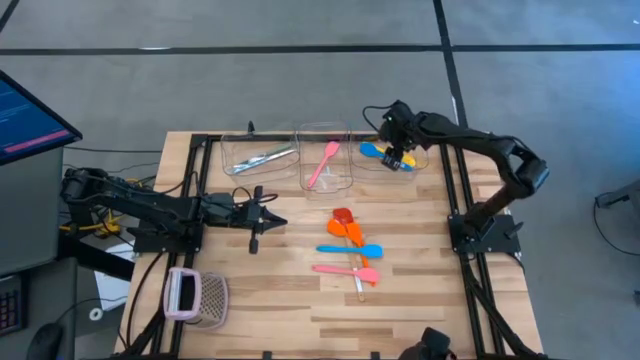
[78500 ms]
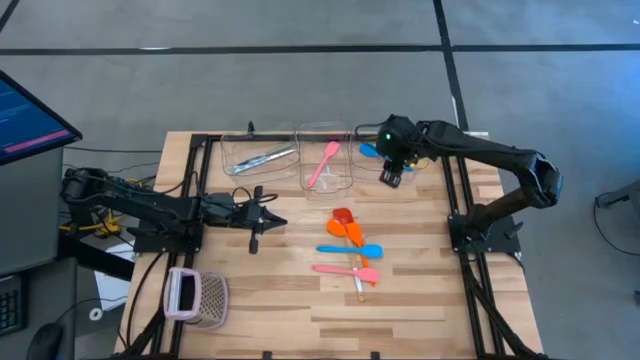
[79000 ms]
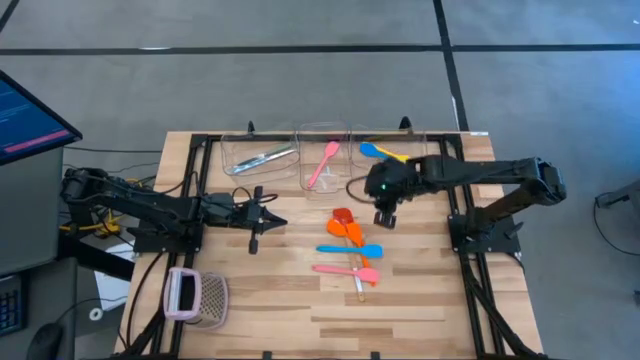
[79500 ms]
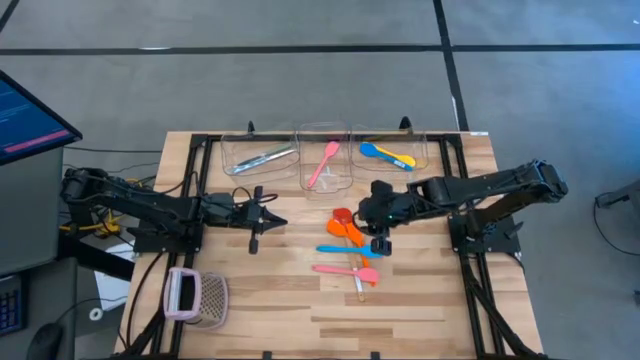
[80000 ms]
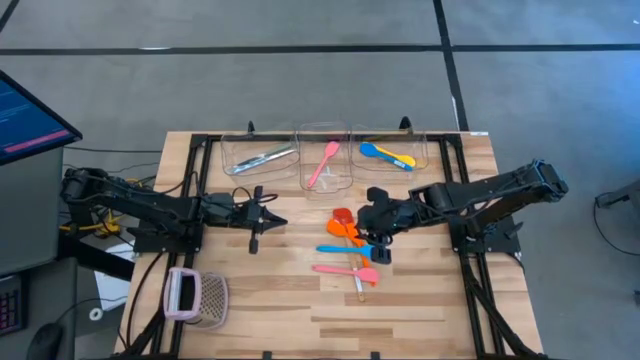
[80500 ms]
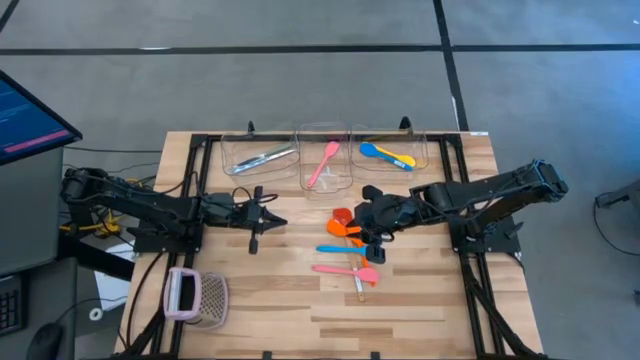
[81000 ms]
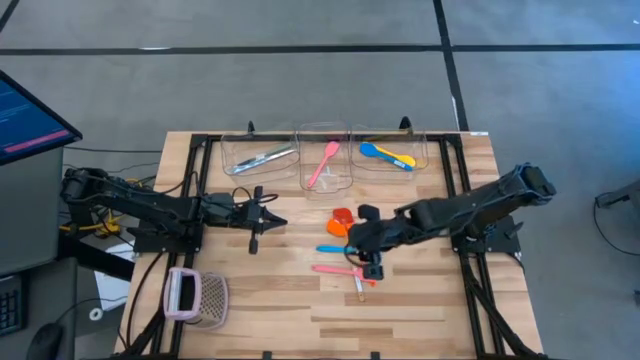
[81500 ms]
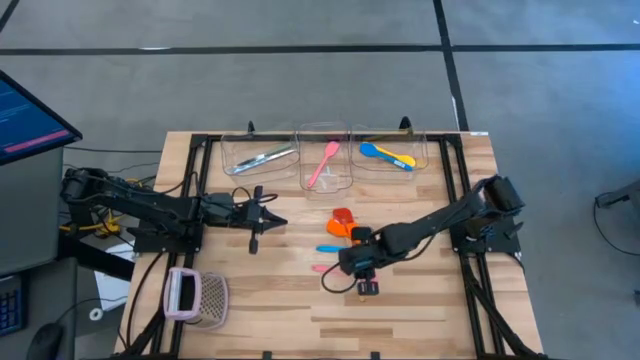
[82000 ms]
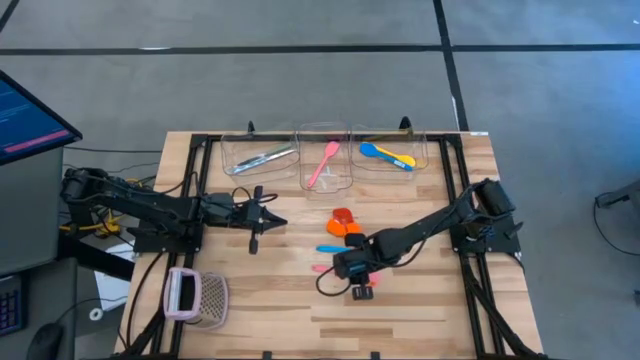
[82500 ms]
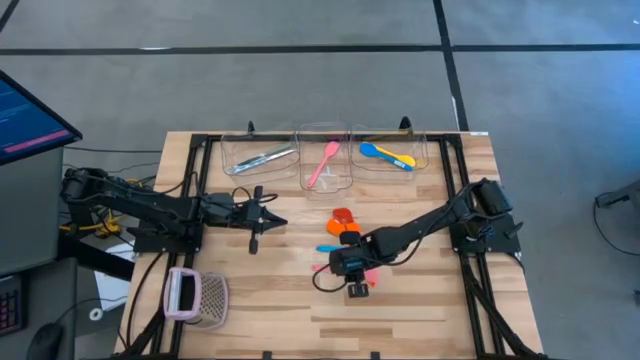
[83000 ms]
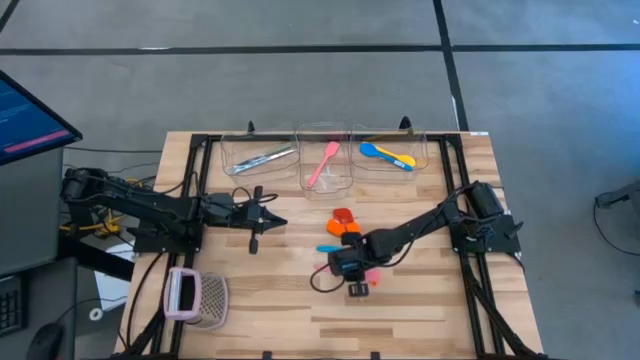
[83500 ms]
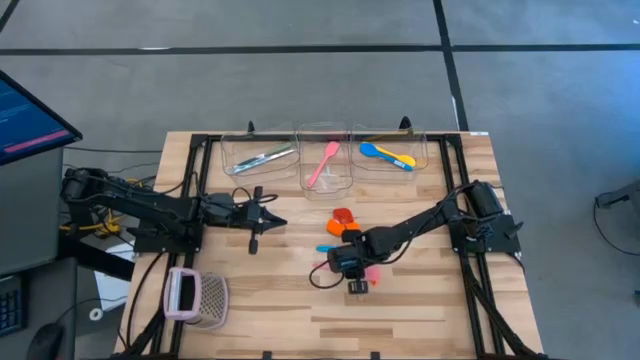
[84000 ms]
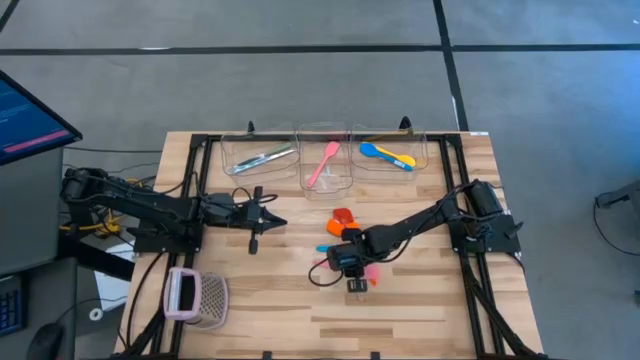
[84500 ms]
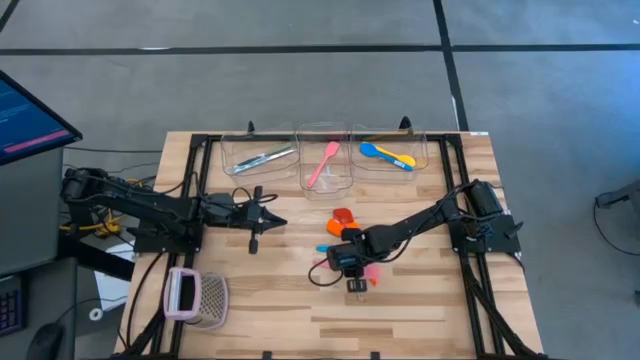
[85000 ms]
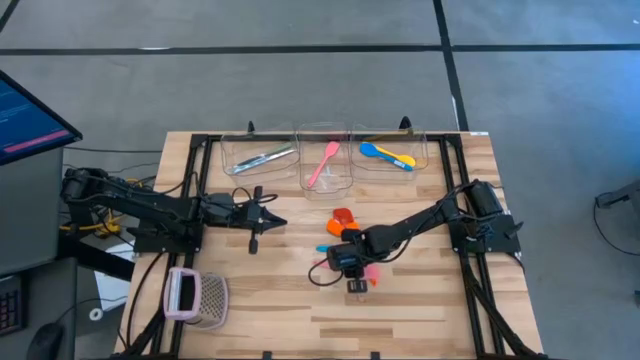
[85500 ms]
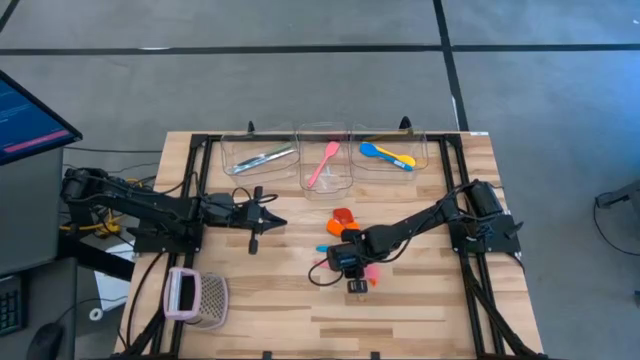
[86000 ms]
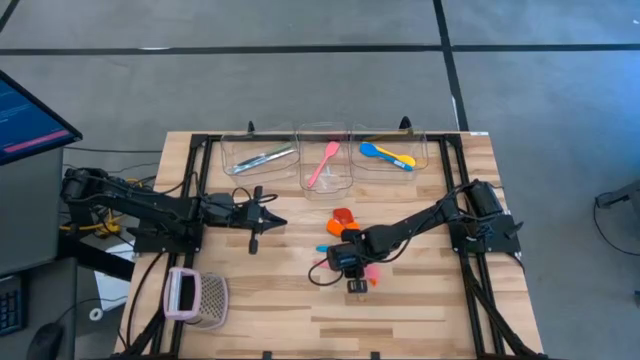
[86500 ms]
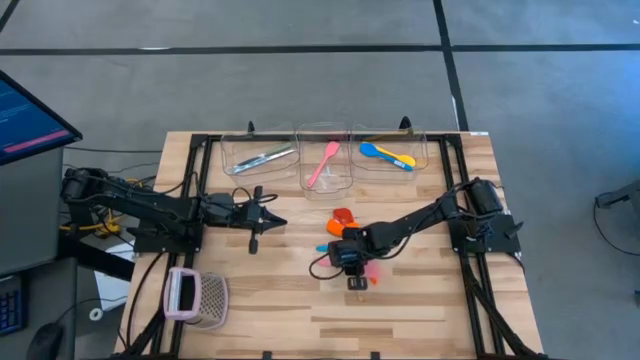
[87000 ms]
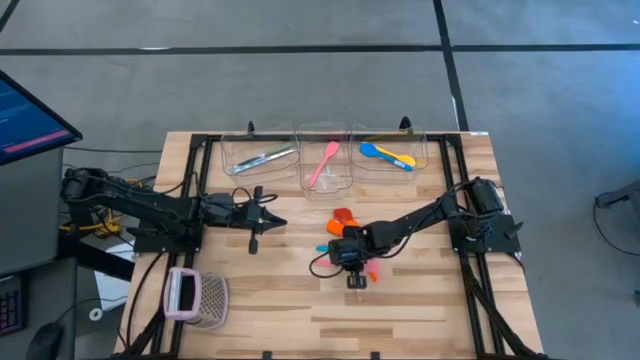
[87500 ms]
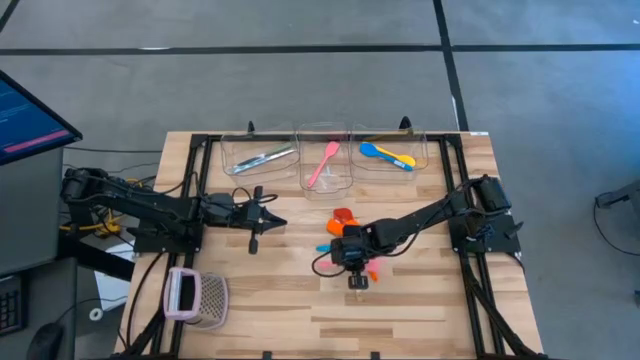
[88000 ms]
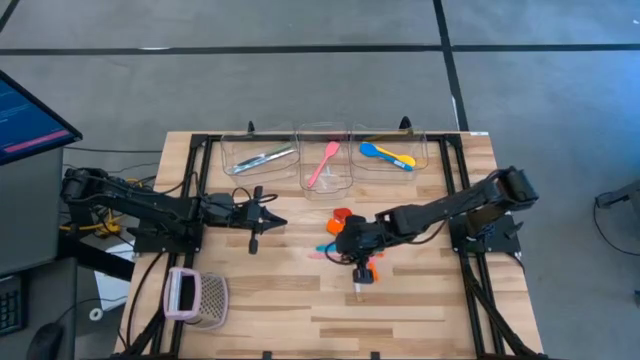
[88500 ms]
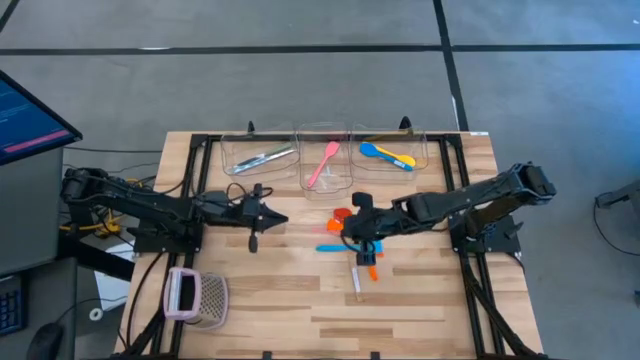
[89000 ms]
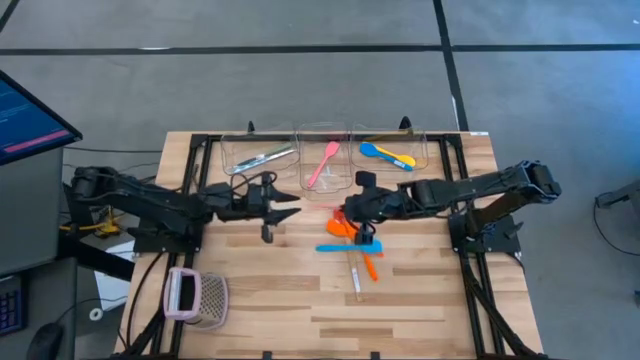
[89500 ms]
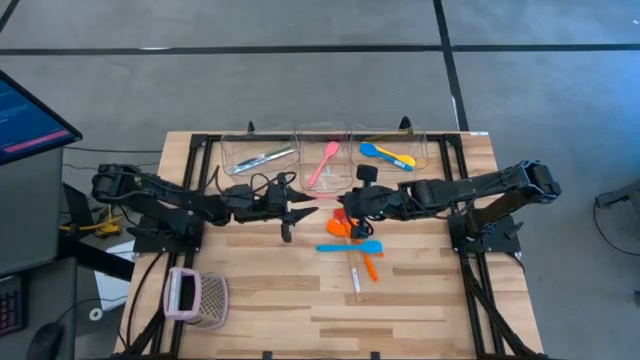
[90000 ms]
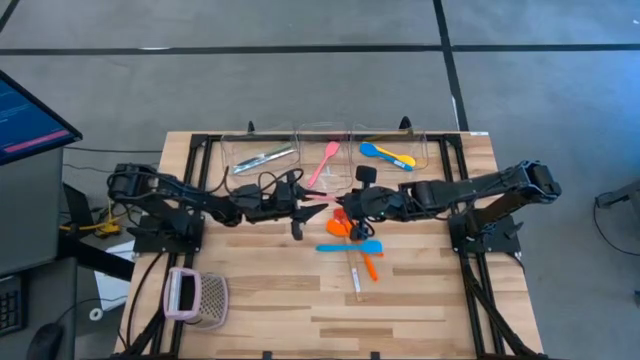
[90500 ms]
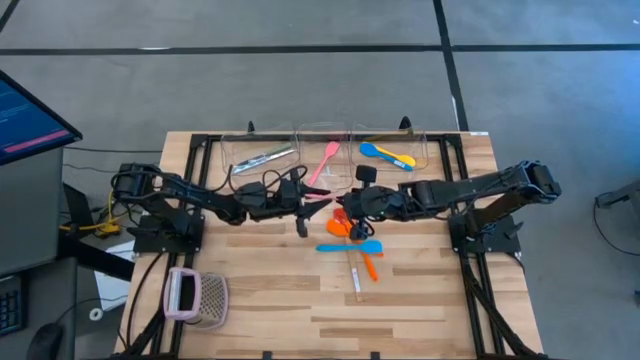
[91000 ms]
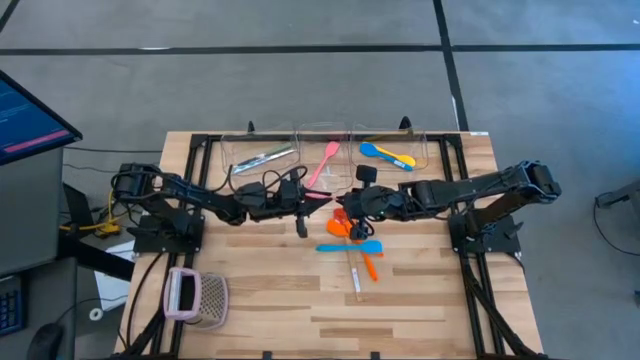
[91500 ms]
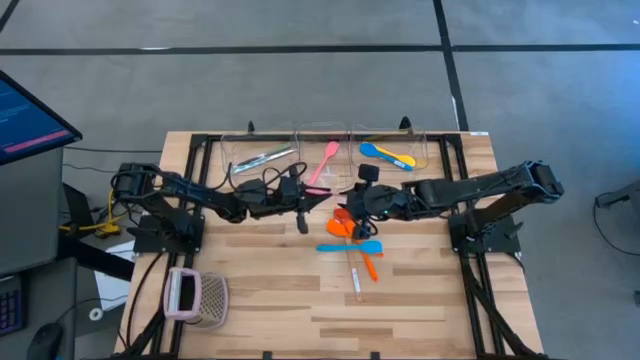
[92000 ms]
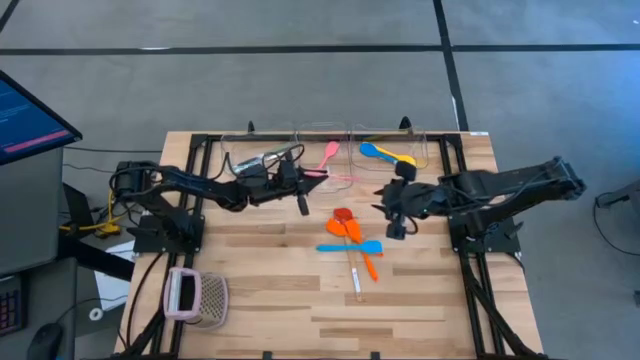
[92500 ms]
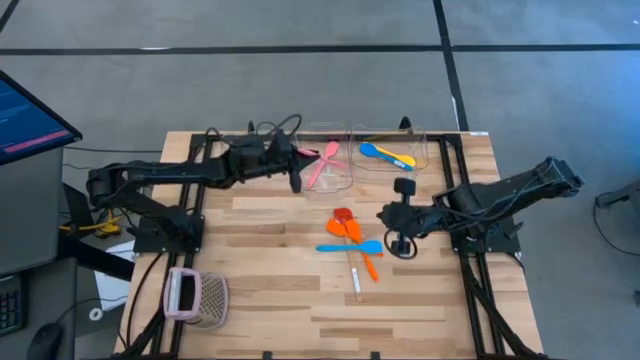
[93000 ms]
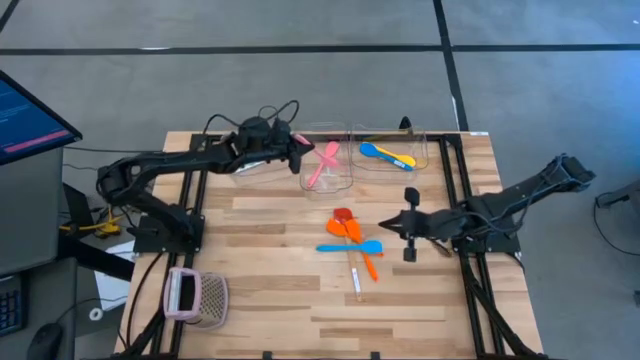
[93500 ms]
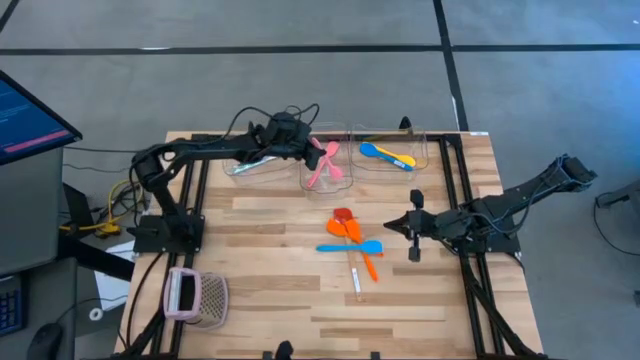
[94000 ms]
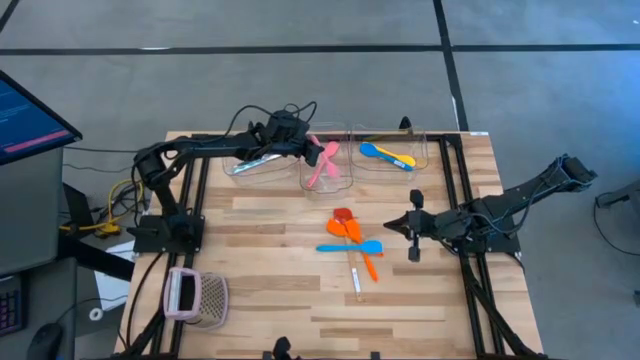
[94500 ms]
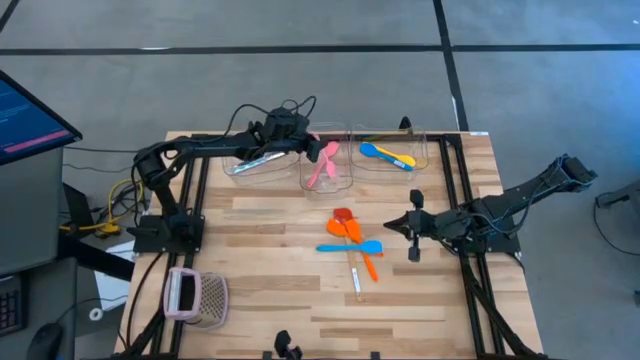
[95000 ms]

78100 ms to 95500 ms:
Task: Pick & Place Kitchen Items
Put the pink spatula into the middle transparent bin

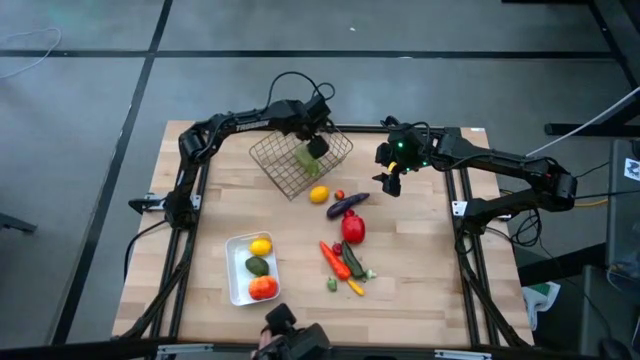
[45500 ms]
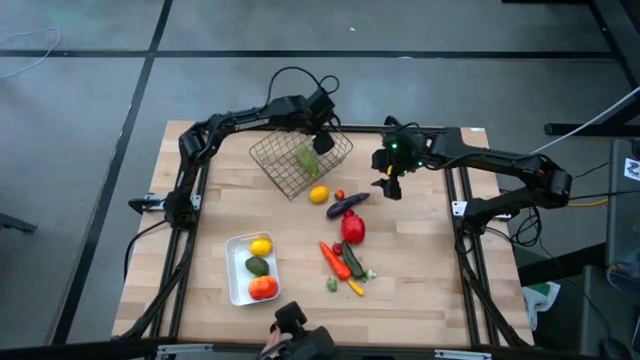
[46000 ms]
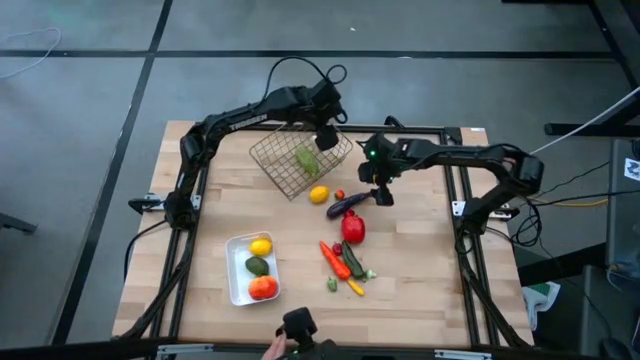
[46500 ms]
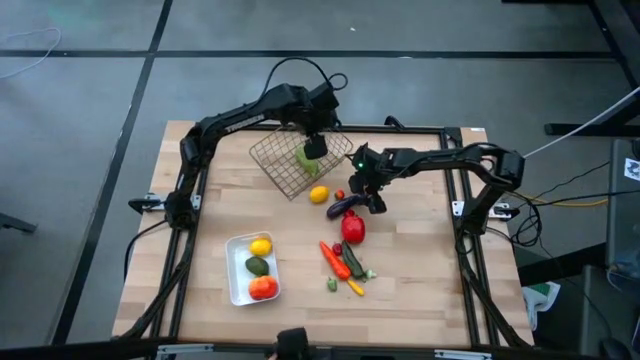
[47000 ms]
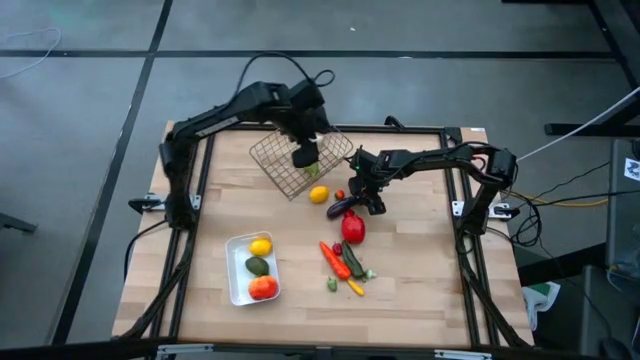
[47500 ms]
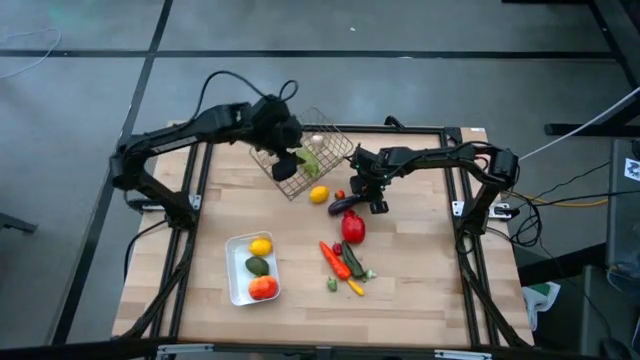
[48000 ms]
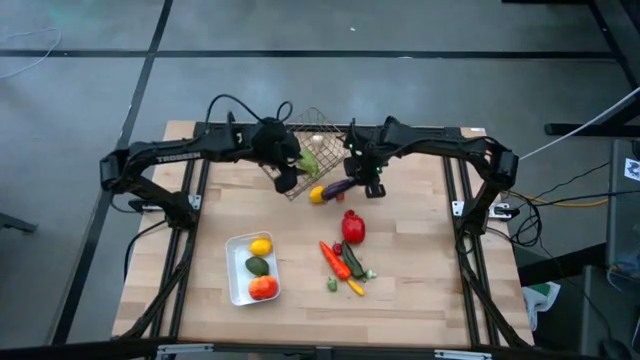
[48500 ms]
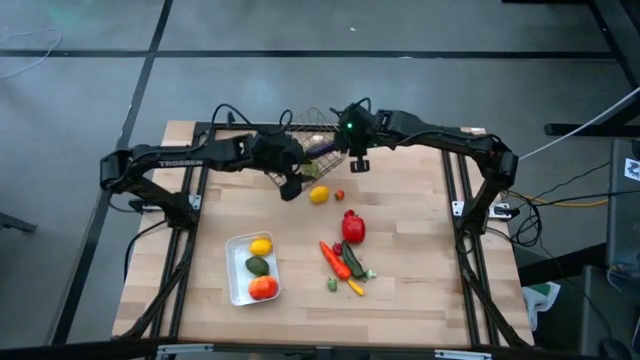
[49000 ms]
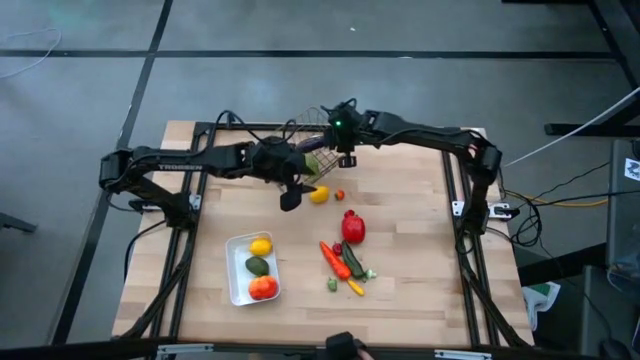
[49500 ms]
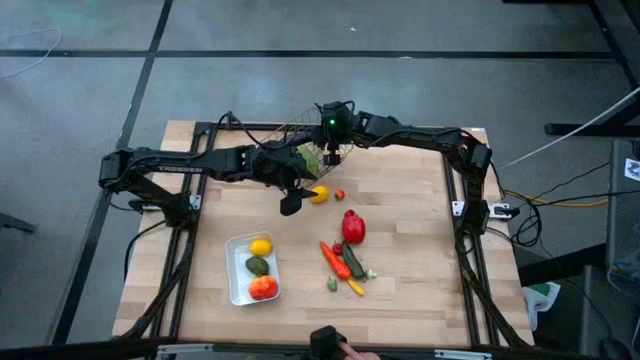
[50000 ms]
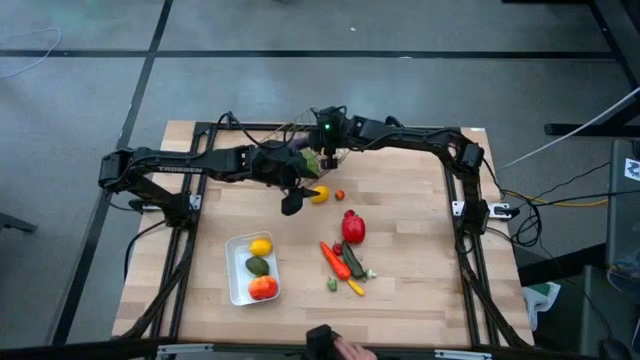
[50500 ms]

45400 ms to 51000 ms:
Task: Sort produce into baskets
Put the purple eggplant into the gold wire basket
